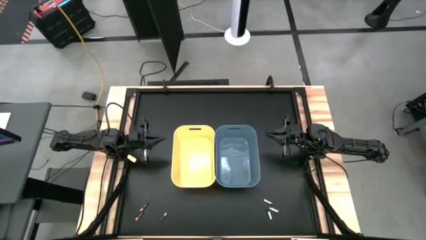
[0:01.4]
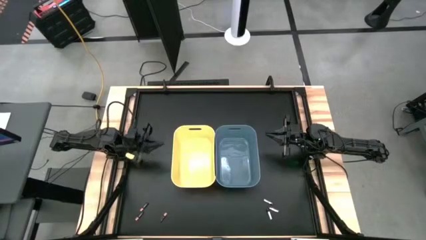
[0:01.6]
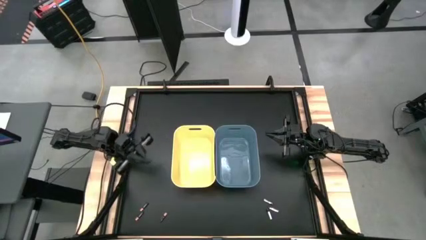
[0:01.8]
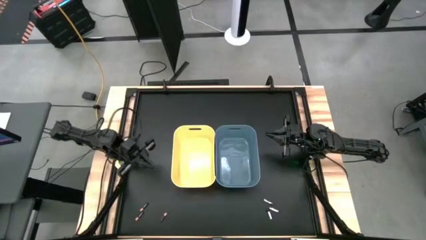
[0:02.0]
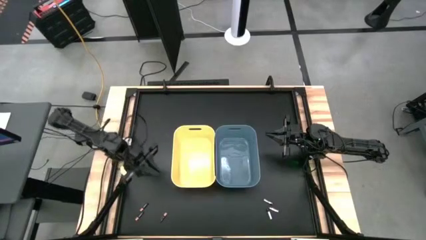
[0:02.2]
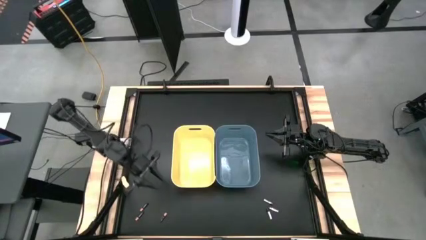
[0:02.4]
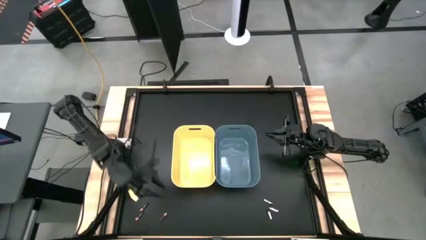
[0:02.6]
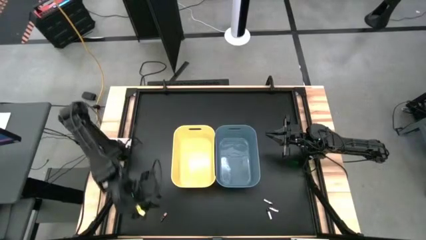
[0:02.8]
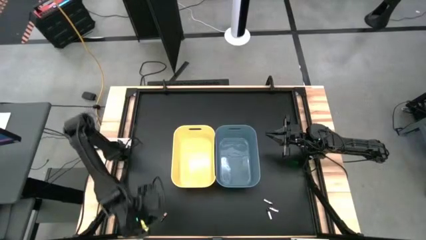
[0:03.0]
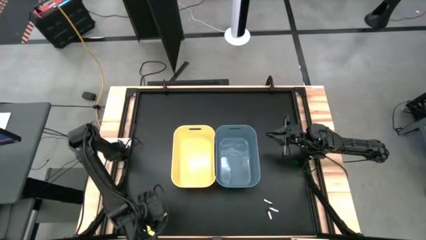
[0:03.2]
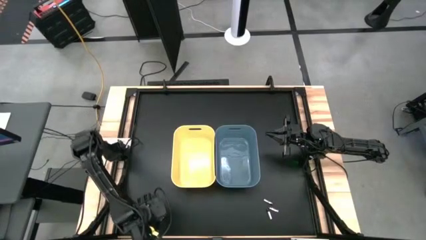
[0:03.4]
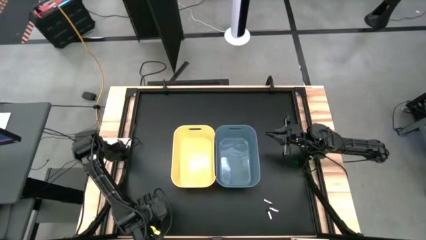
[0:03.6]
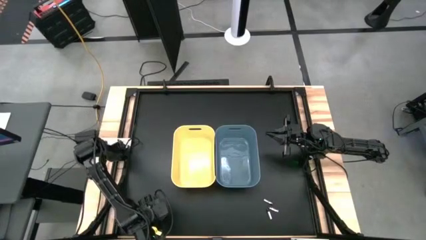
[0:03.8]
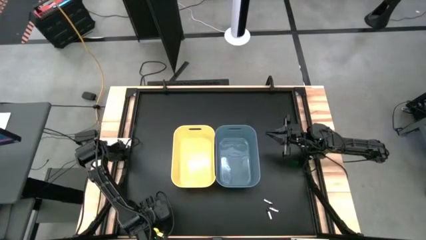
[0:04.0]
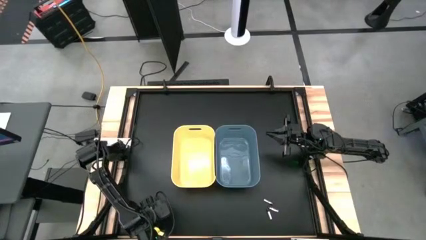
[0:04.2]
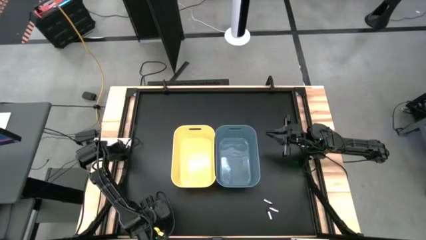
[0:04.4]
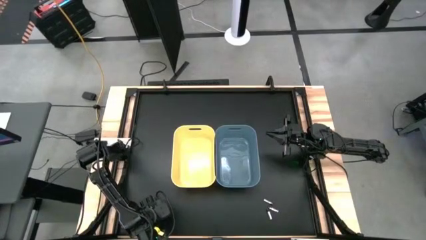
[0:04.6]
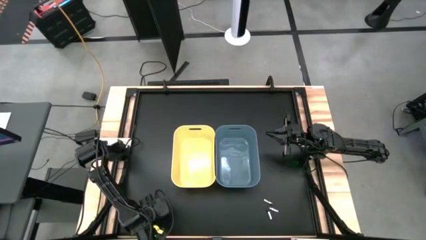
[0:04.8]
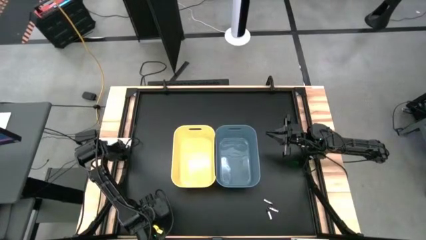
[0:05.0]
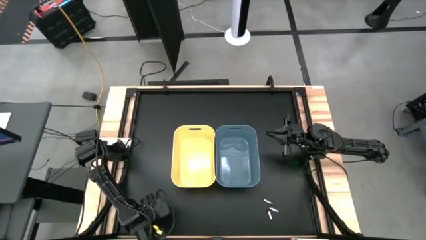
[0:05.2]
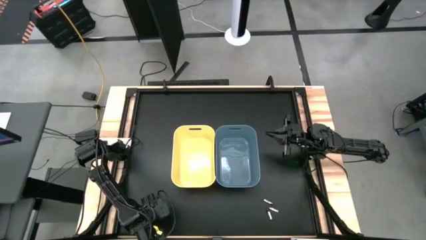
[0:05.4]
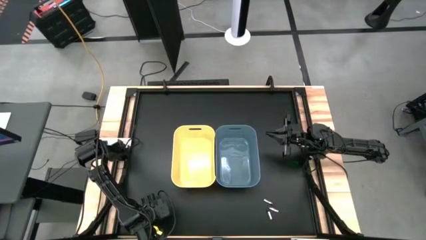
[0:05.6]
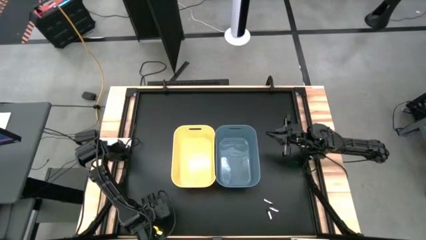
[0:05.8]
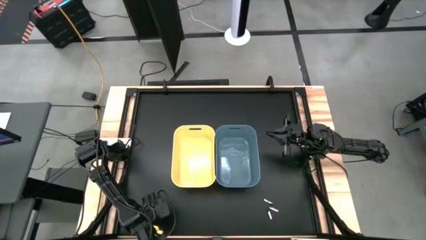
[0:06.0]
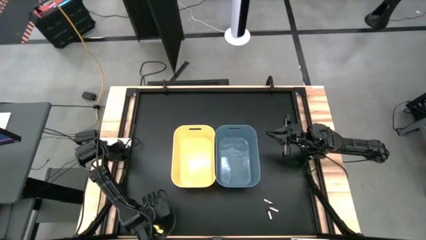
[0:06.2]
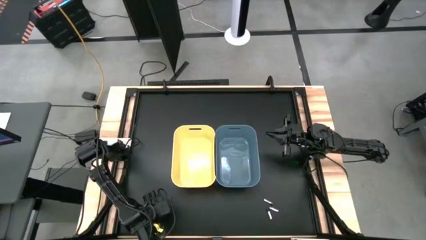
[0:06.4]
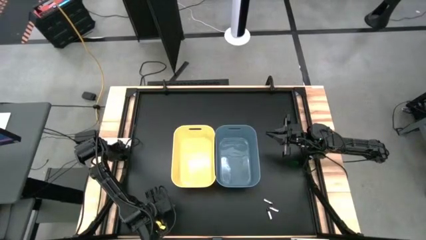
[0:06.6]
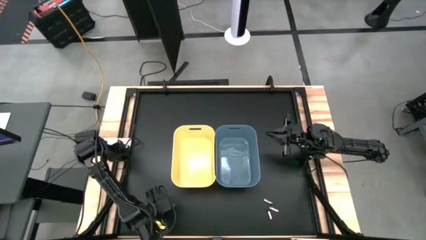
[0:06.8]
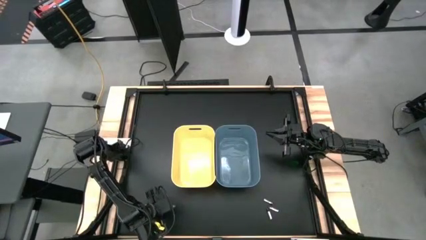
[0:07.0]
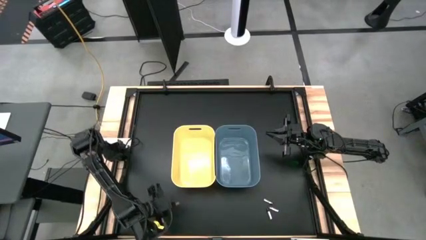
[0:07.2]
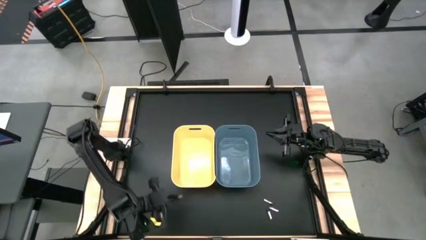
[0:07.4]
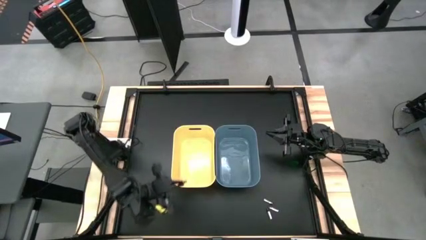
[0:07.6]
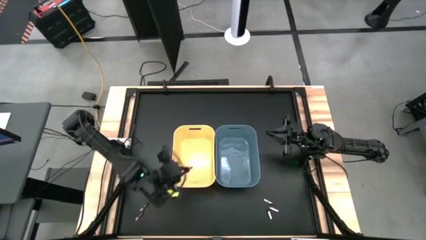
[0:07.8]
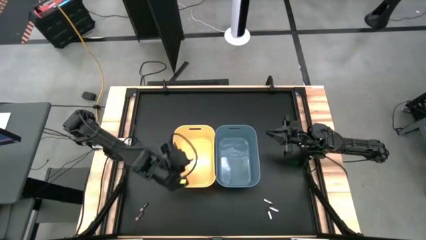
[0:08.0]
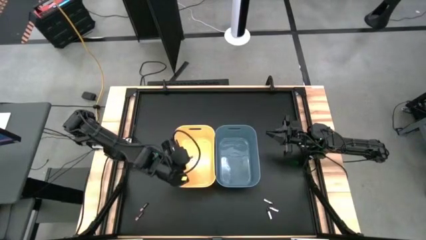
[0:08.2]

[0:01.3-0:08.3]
Task: Sort batteries
Put the right black battery into the yellow bin

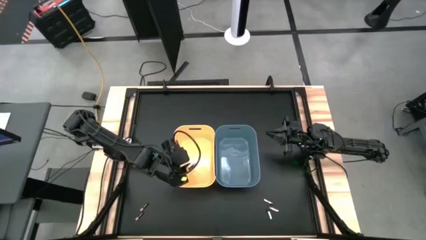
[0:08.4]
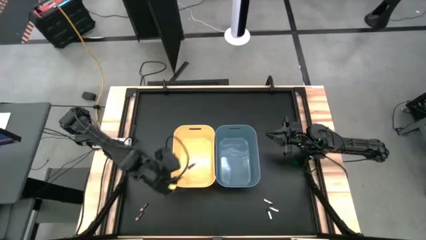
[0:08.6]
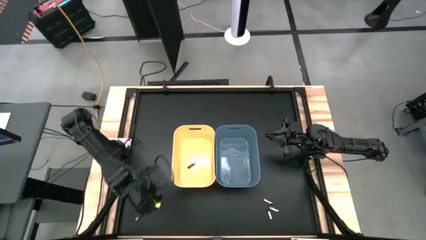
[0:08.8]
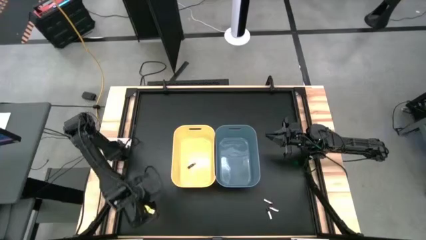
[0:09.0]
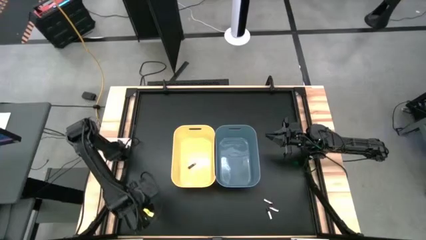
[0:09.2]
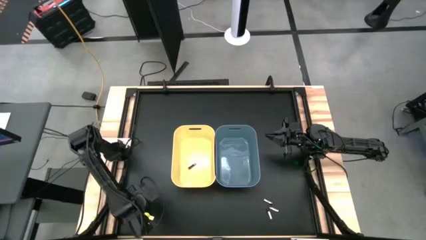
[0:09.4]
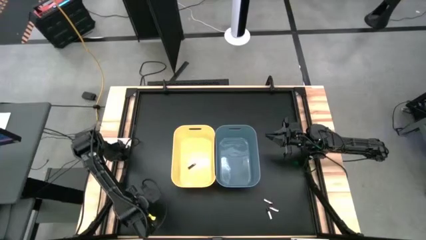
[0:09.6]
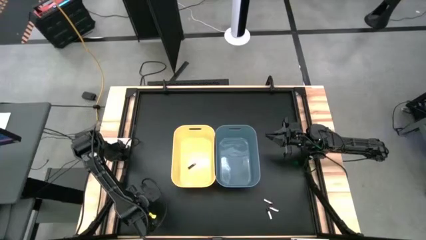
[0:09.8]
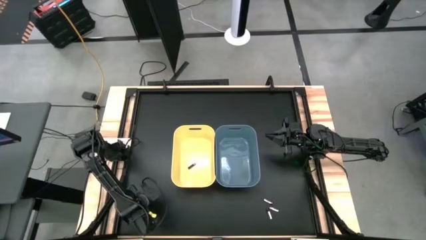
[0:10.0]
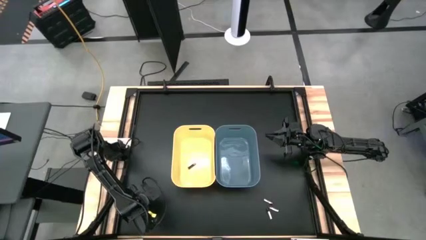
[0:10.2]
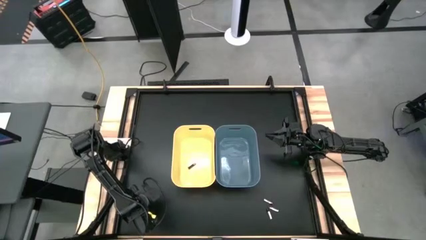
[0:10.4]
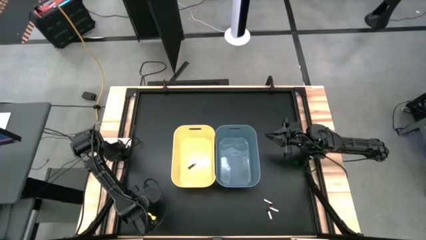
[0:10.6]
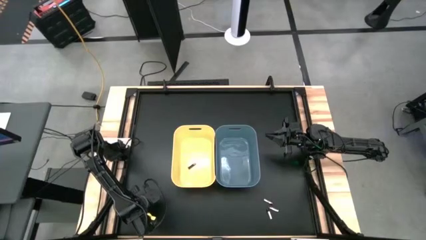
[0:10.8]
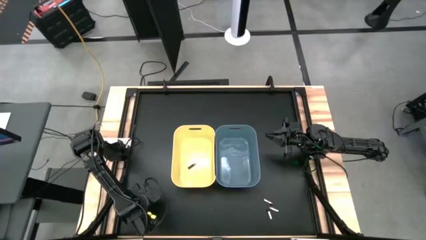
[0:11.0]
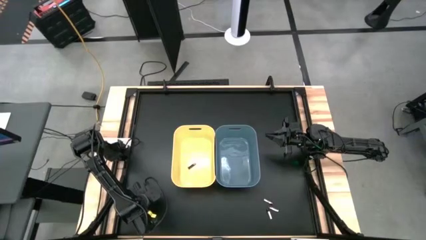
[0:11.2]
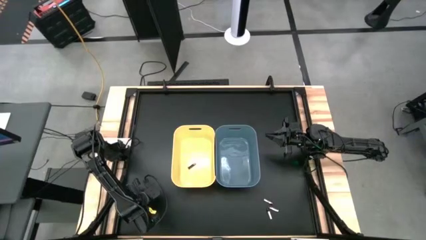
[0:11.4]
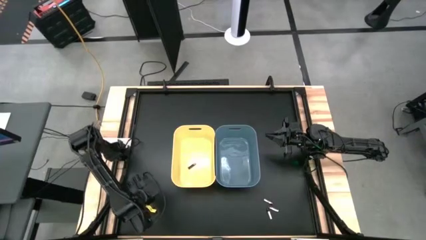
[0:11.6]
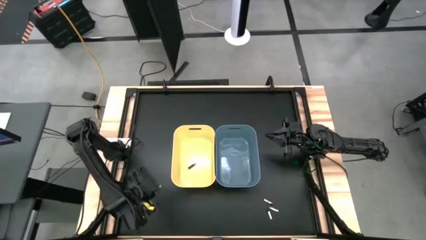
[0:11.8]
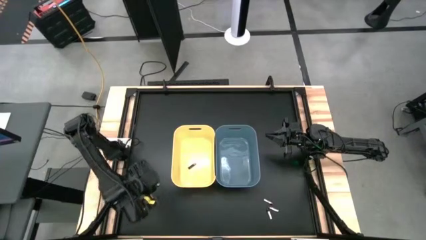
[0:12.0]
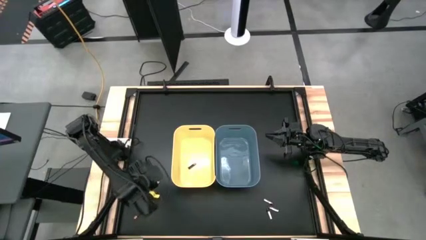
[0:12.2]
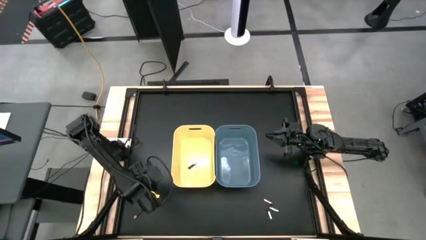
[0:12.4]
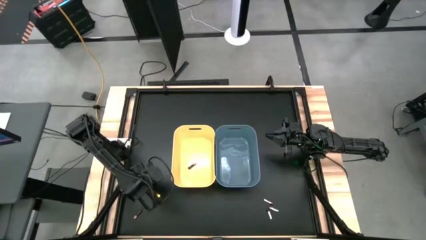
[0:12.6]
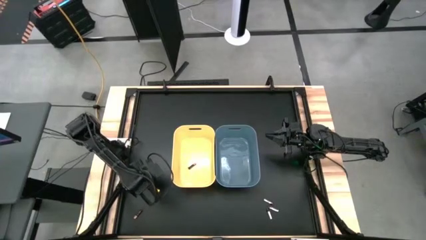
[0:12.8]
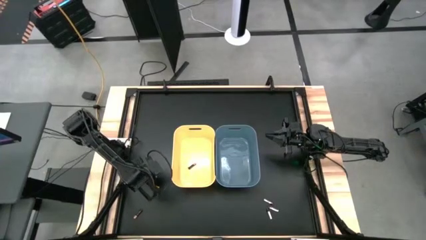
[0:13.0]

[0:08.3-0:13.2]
Put the top black battery into the yellow bin

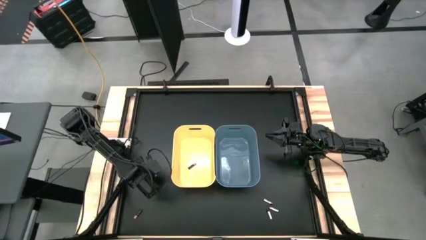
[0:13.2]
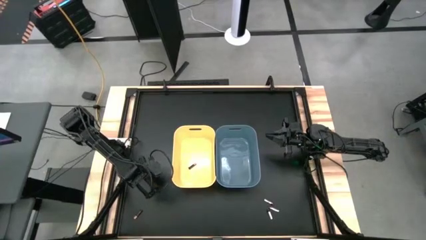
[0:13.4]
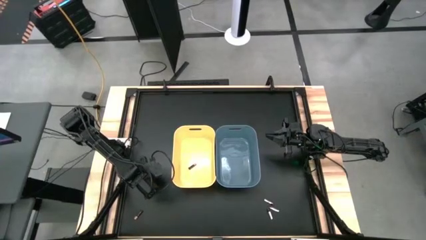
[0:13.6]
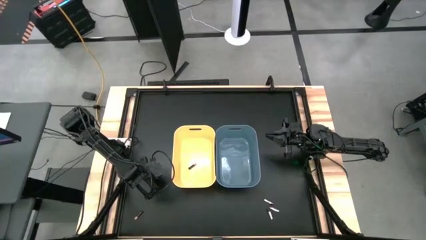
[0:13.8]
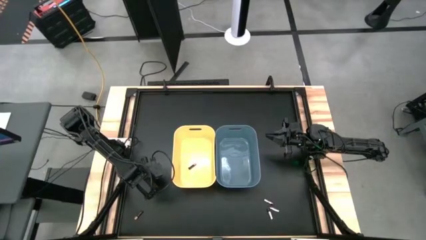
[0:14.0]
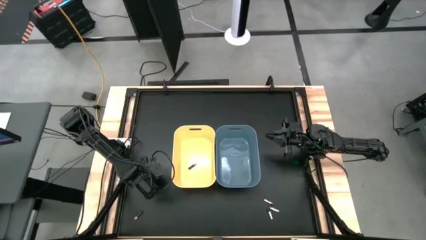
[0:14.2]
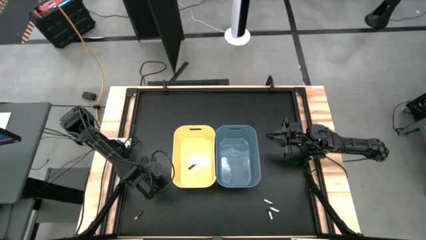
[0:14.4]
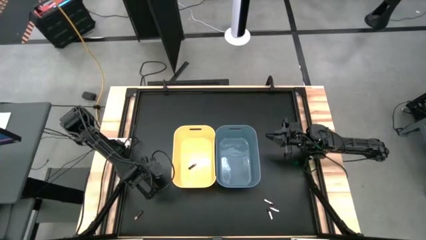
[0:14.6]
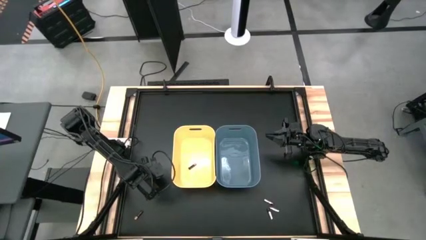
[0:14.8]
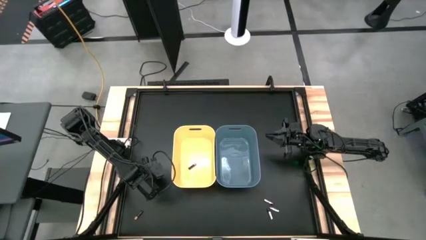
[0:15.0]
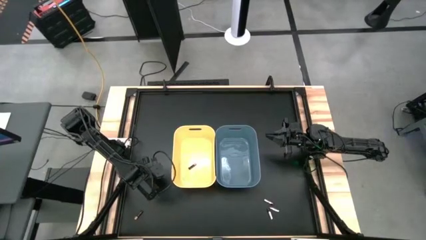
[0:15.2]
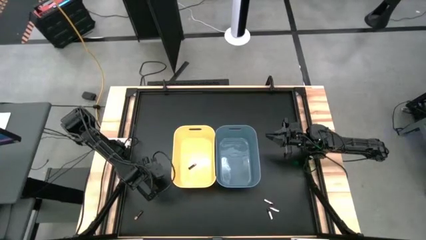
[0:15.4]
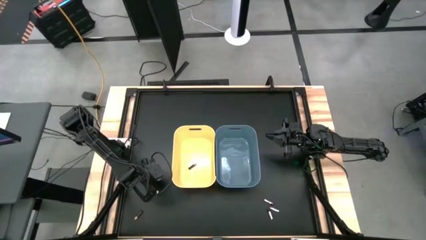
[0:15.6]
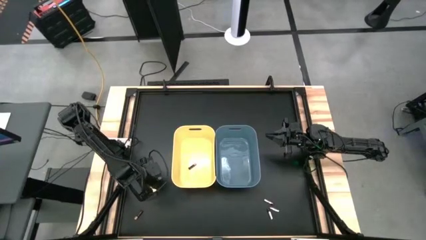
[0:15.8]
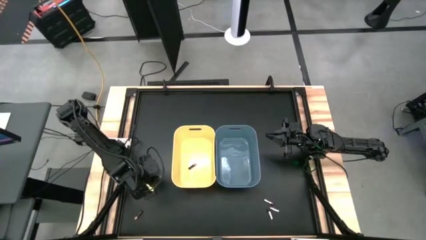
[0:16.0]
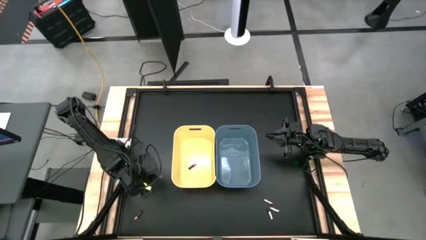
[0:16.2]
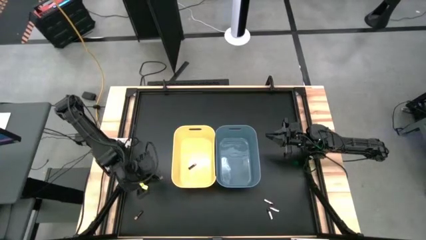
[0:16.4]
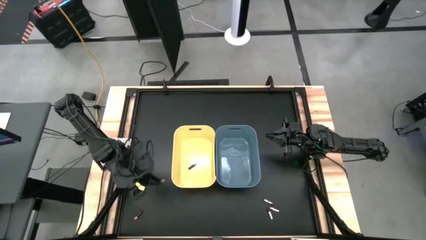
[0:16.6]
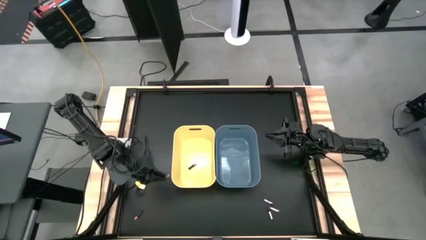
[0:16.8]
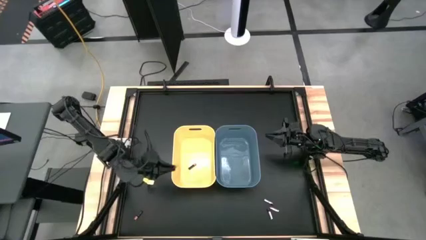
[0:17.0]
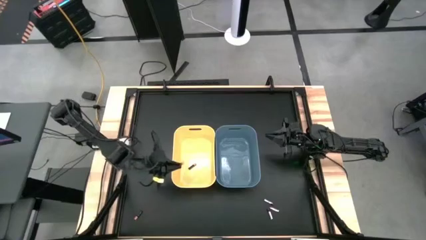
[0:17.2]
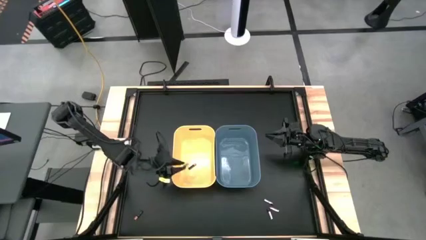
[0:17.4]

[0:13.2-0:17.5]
Put the top black battery into the yellow bin

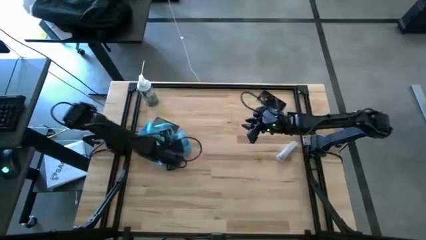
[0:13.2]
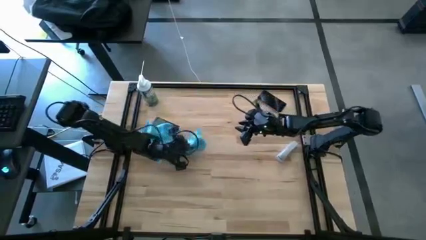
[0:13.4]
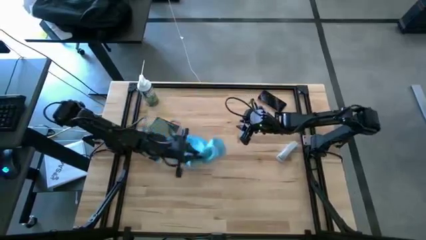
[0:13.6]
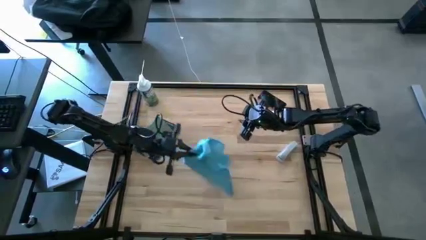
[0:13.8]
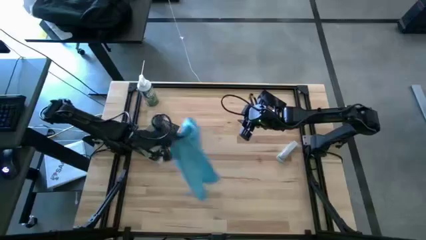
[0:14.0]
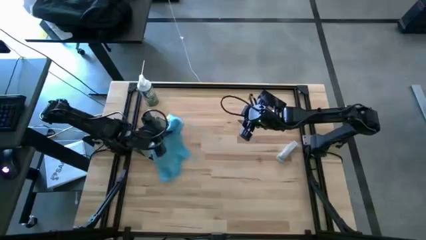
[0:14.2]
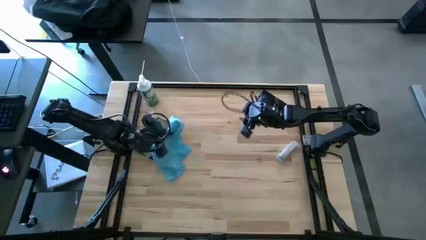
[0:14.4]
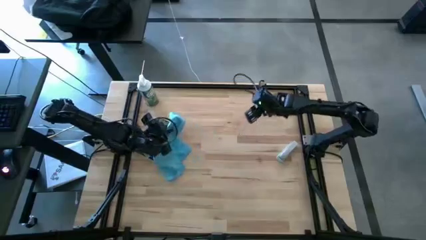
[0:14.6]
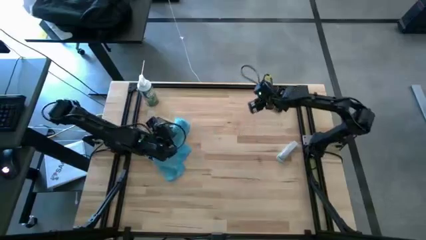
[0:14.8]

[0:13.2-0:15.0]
Task: Apply microfiber cloth
Put the microfiber towel on the left books
